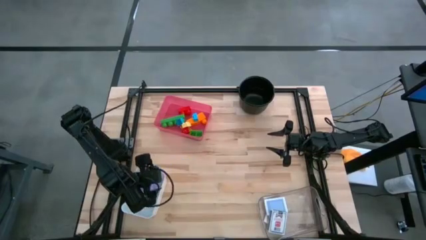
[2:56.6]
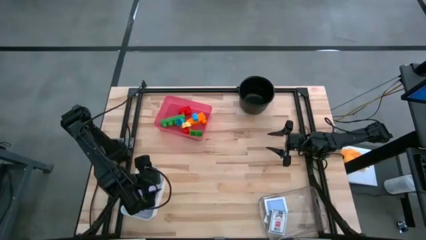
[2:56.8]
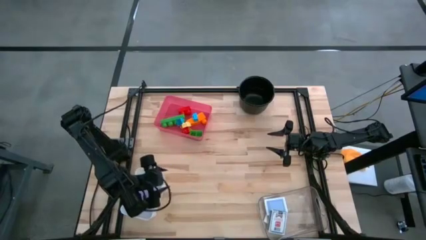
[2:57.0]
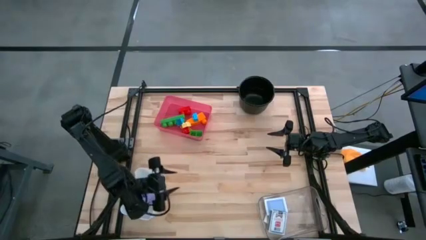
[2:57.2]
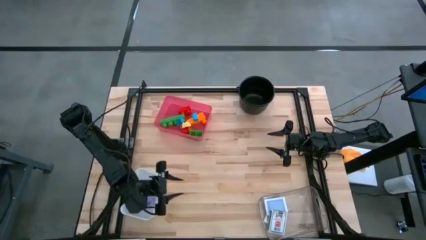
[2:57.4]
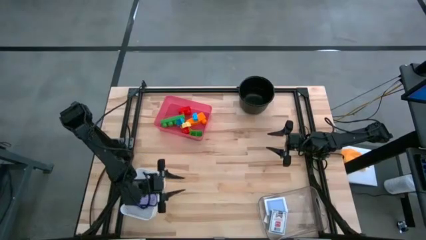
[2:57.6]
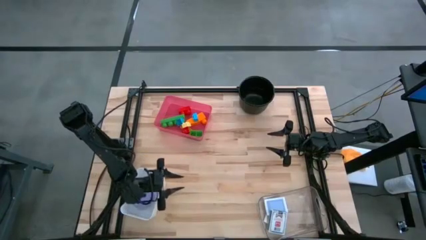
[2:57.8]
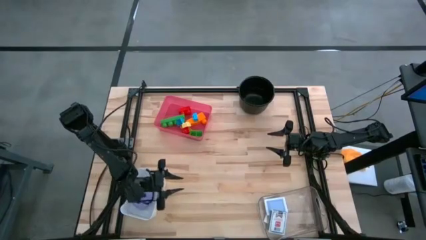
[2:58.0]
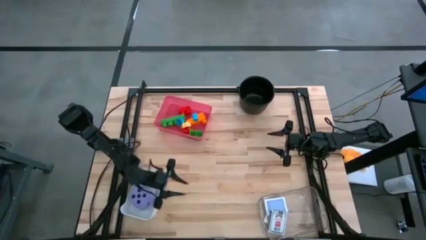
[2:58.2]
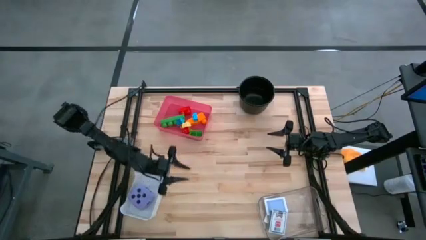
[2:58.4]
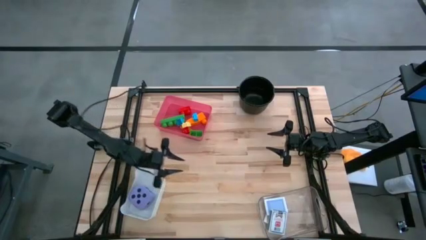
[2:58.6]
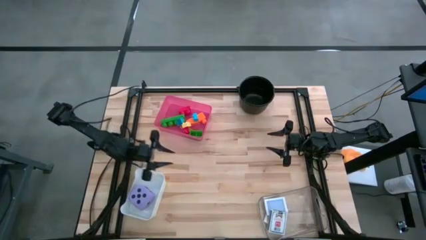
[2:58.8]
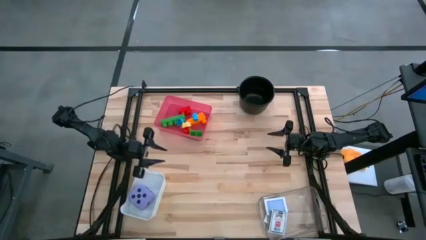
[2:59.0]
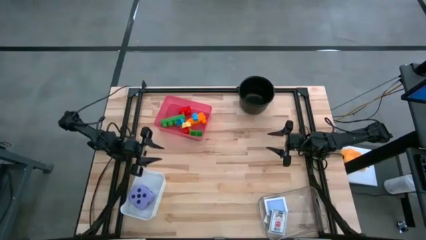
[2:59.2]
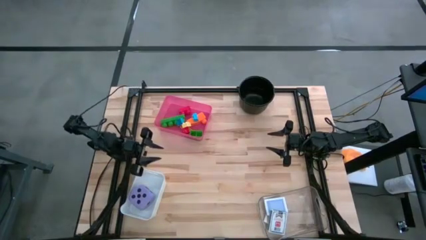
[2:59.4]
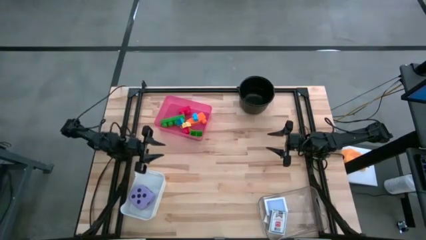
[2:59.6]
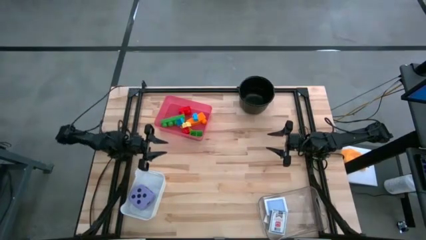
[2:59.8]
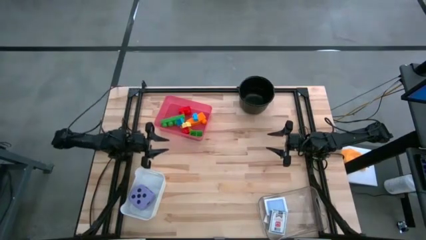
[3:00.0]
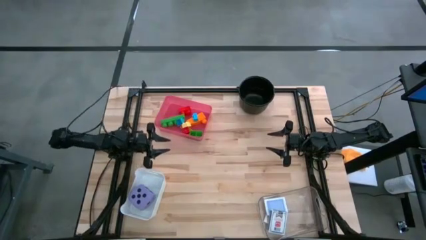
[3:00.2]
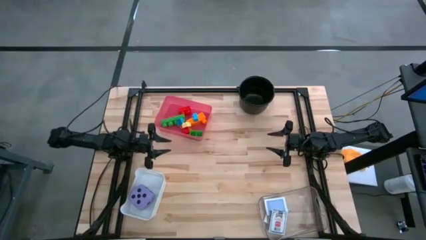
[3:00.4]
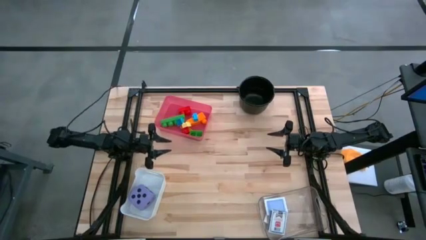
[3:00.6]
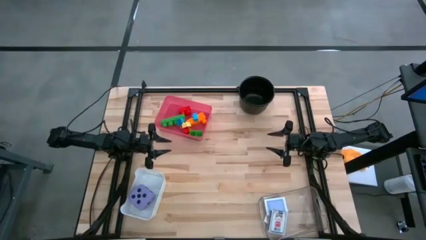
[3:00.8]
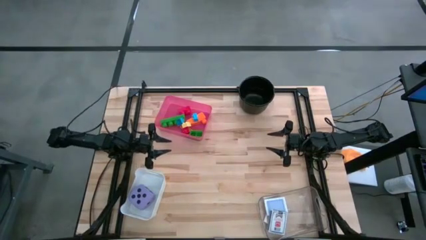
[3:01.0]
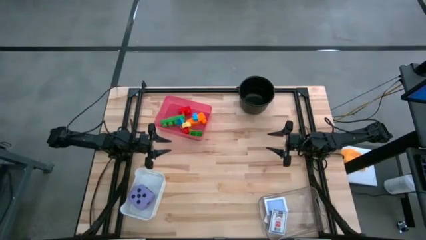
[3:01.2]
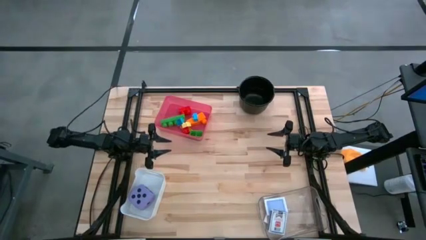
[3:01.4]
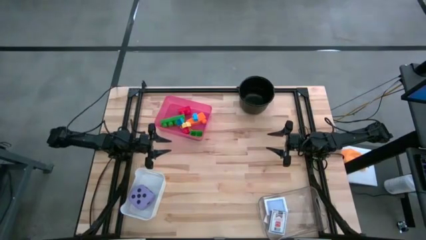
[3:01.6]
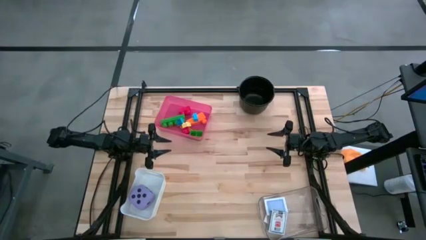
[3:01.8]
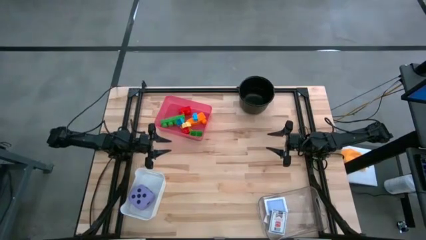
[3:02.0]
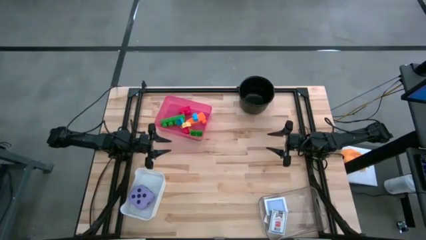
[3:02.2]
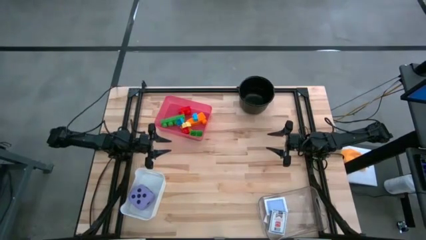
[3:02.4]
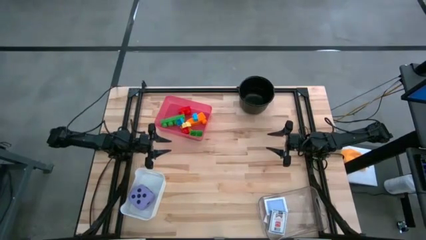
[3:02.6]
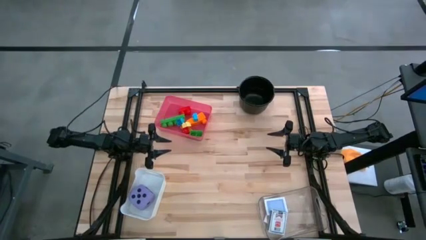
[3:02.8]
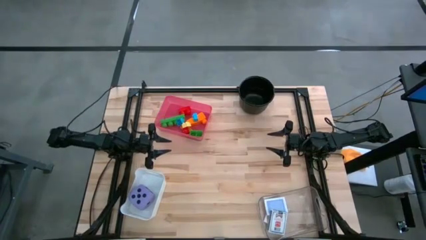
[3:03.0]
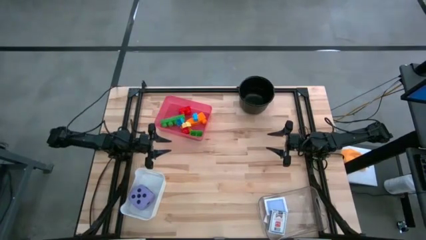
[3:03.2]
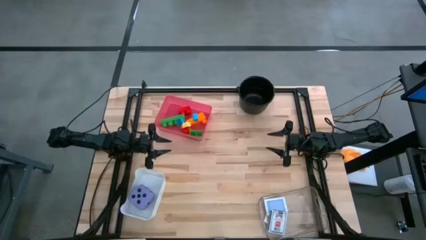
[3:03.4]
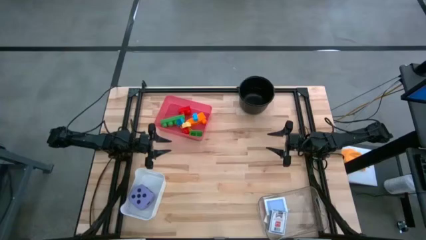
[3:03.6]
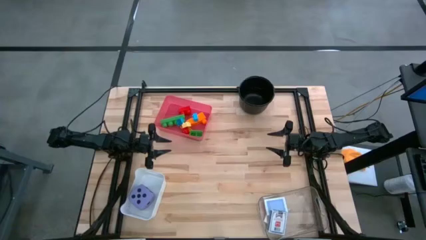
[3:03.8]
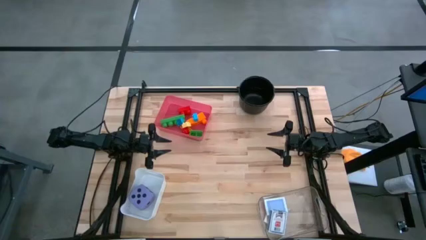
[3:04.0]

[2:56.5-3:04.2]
Task: Pick & Place Toys
Return to Home Position

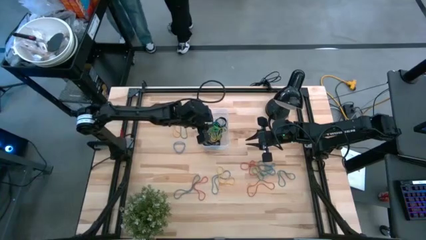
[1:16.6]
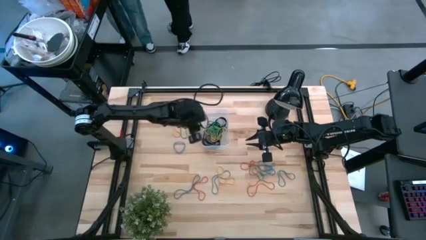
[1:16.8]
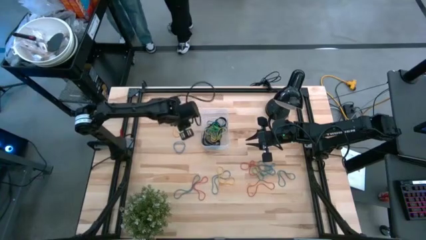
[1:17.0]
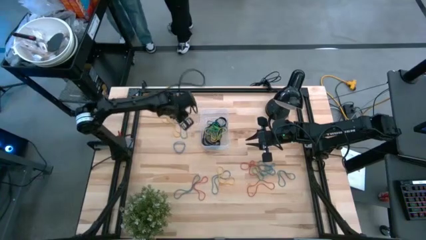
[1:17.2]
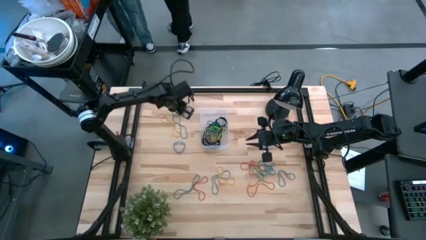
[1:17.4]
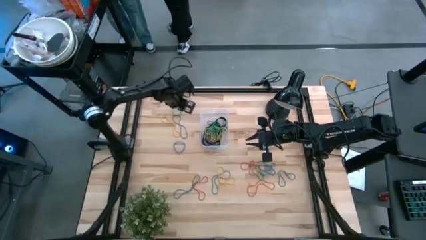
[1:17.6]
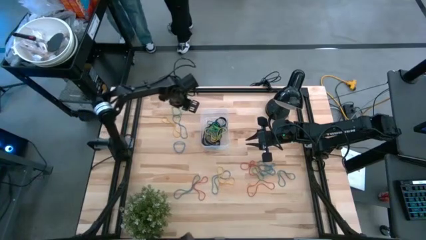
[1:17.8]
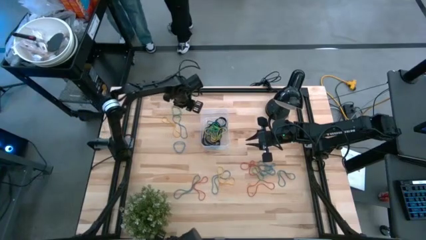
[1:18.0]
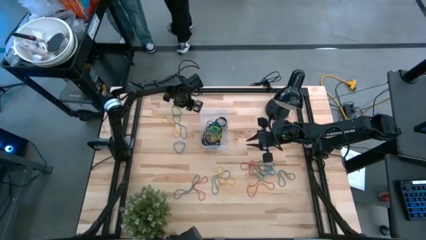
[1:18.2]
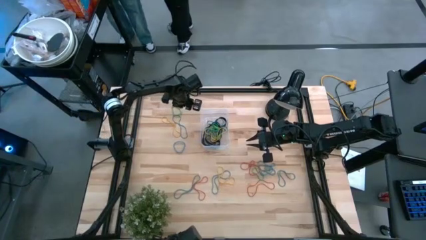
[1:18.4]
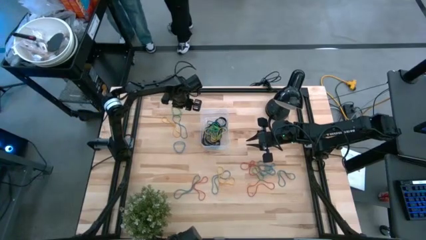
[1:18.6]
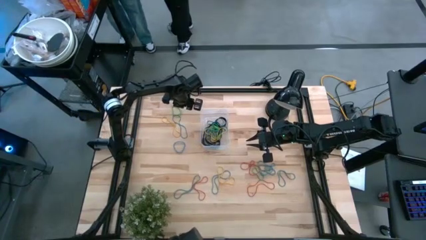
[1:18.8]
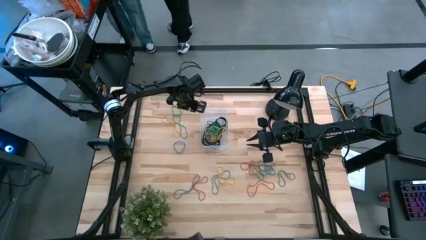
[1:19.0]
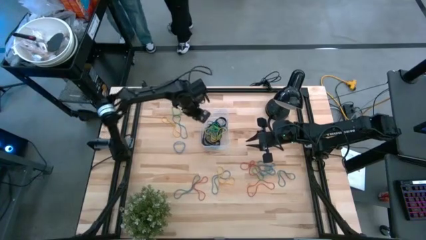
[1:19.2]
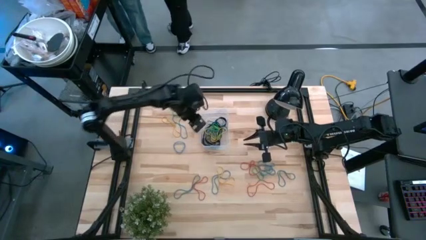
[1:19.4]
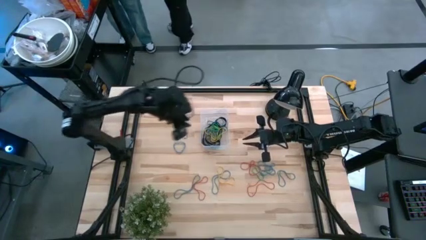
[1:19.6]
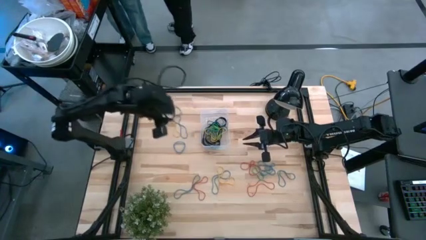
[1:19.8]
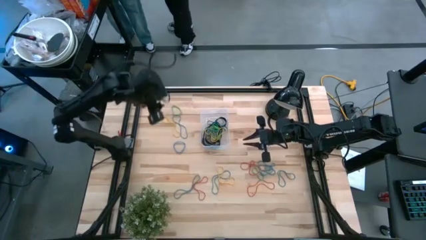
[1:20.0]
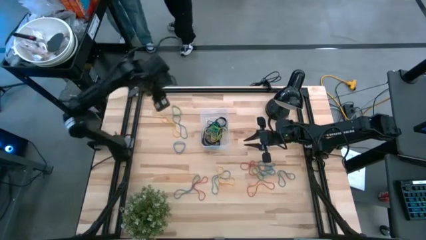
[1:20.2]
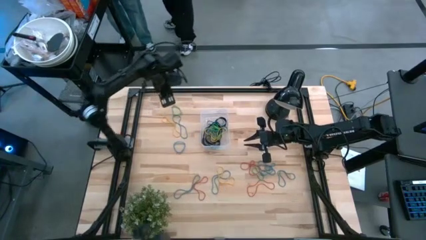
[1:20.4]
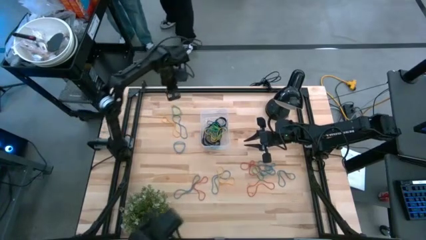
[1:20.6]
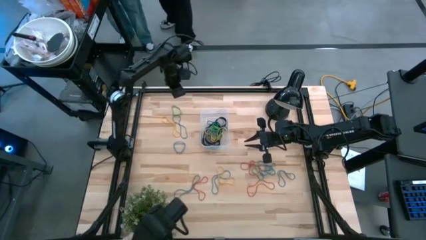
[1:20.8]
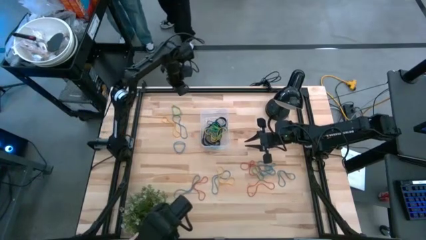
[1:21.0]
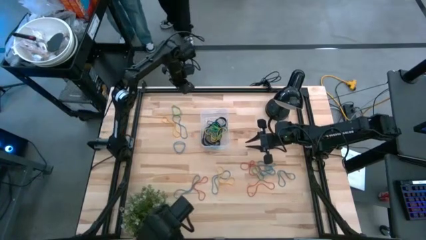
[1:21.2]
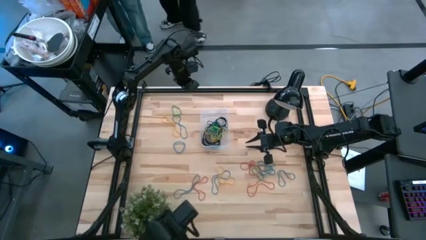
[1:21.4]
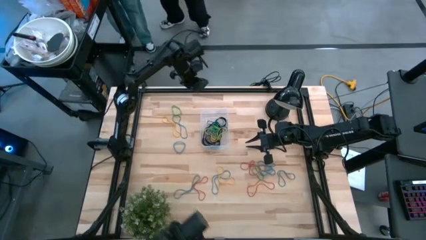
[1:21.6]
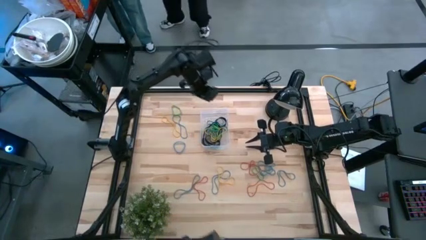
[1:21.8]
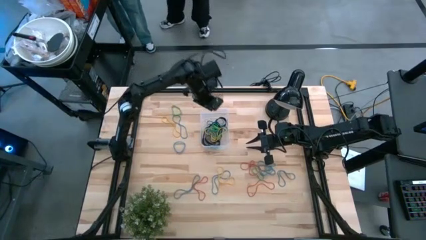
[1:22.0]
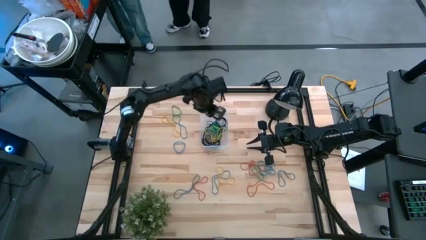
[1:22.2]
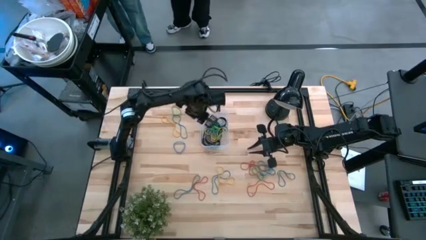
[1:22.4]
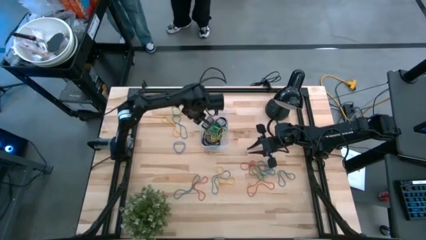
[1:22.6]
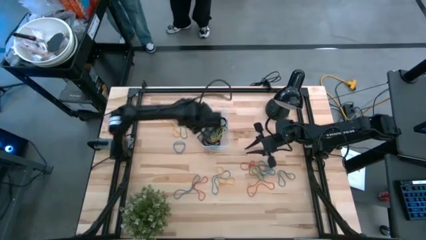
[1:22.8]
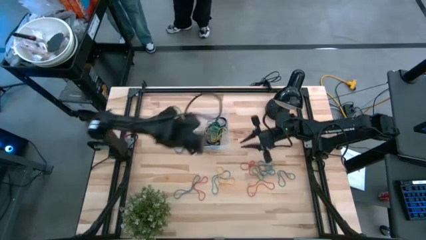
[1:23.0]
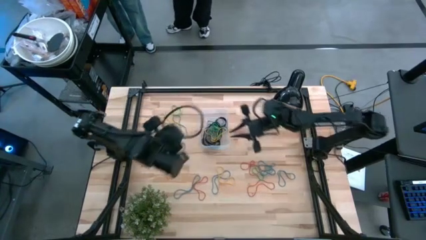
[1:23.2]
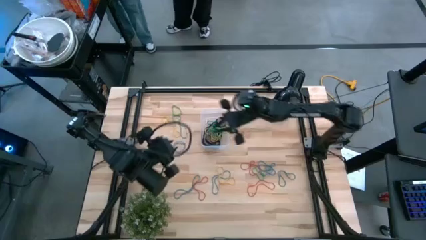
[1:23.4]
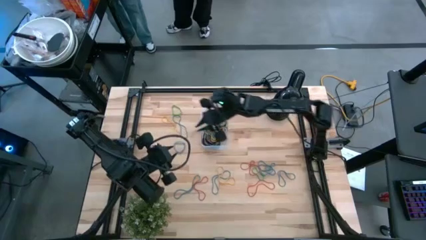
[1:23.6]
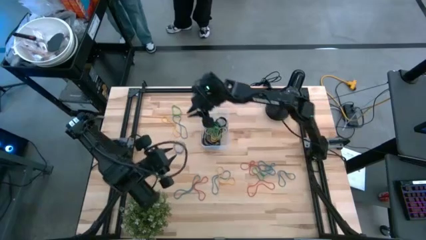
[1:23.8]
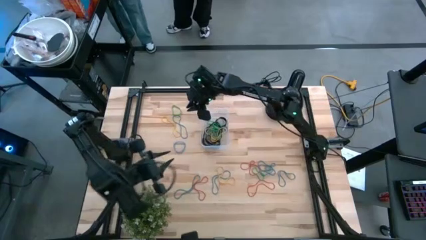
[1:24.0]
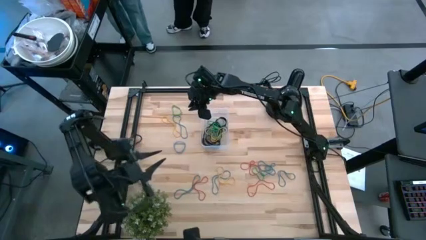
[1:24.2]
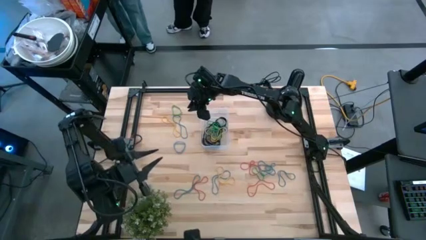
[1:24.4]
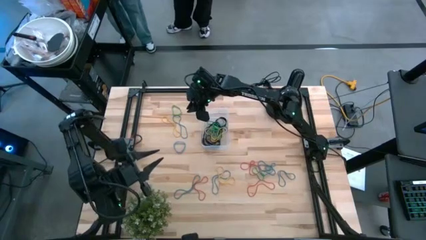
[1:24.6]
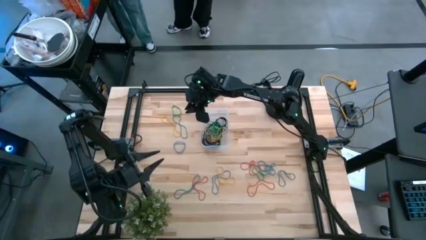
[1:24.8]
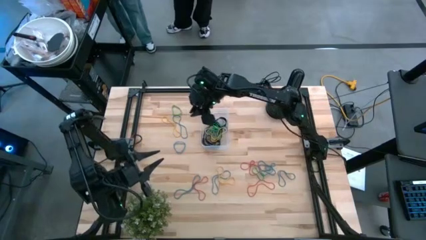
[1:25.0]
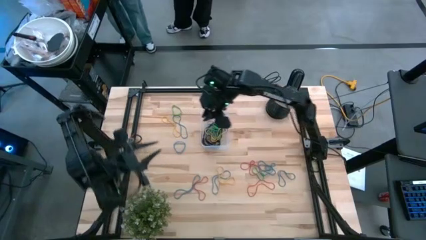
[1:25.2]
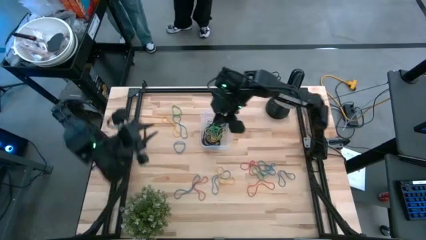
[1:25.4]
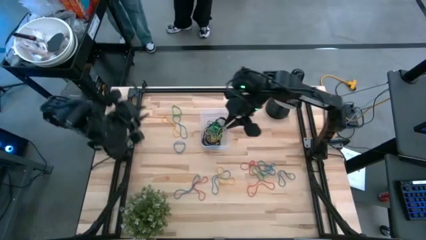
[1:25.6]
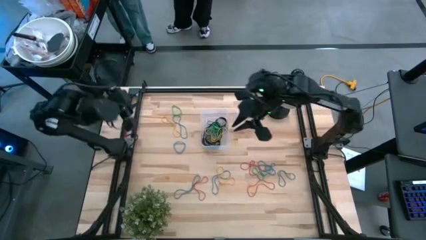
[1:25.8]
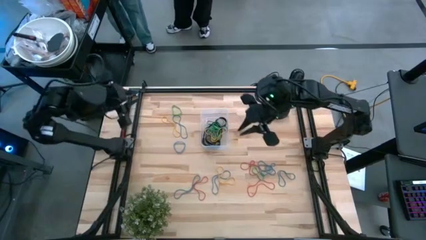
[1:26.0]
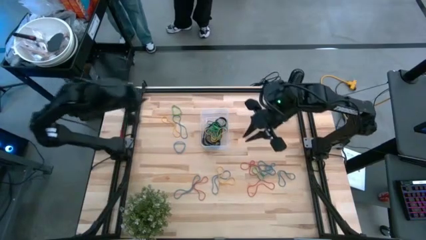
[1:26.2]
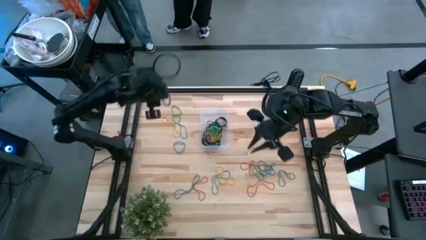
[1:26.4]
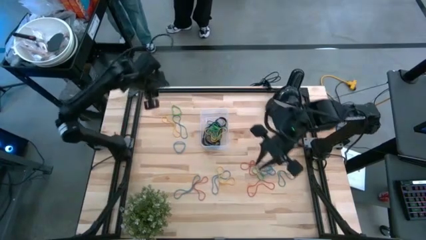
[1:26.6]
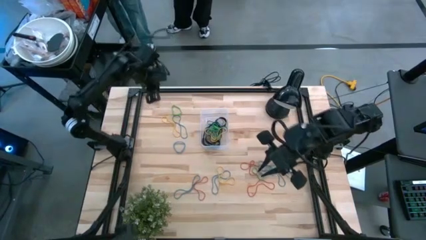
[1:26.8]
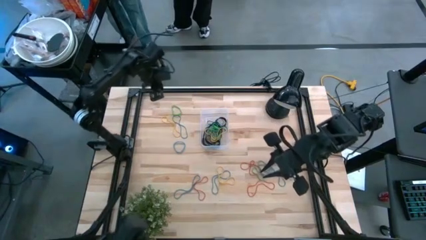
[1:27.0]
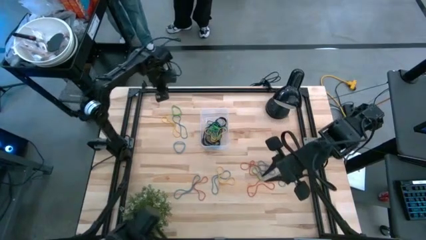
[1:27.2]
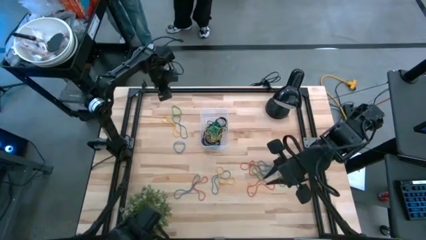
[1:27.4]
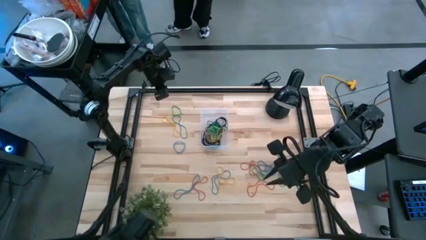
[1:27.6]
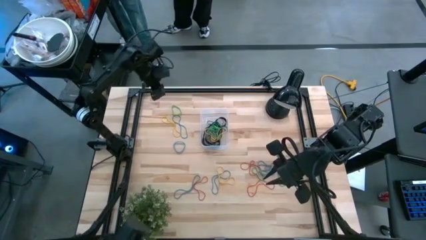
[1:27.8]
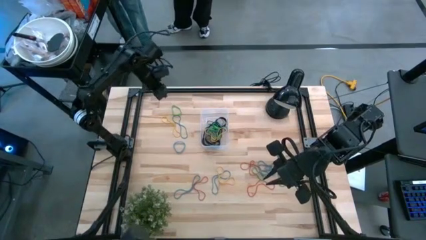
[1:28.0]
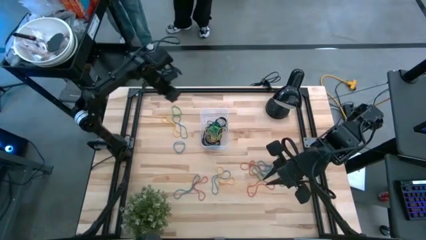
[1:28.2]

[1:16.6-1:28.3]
Task: Pick and place rubber bands into bin
Put the green rubber band into the transparent bin
